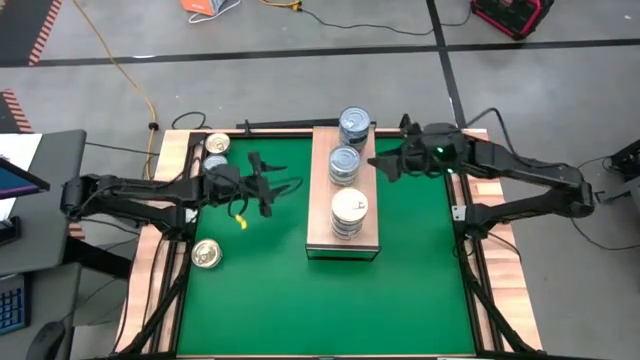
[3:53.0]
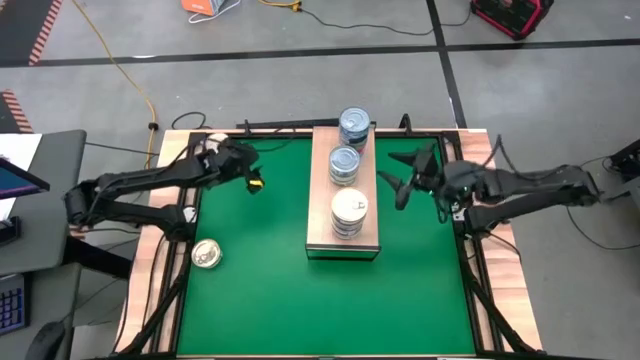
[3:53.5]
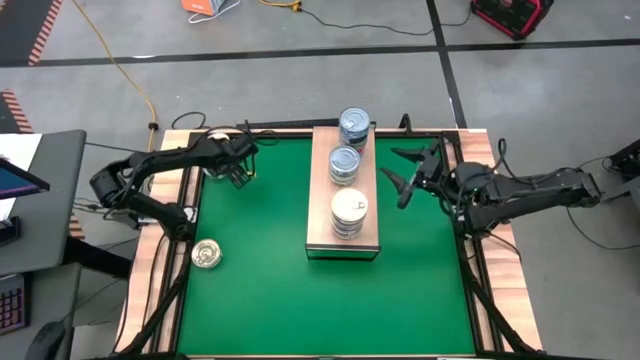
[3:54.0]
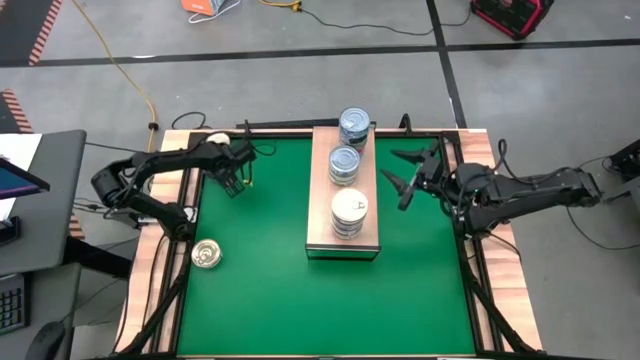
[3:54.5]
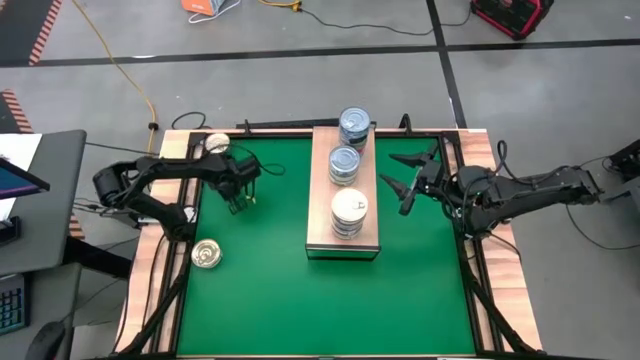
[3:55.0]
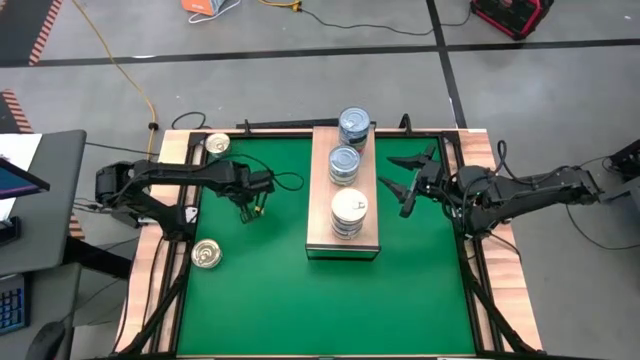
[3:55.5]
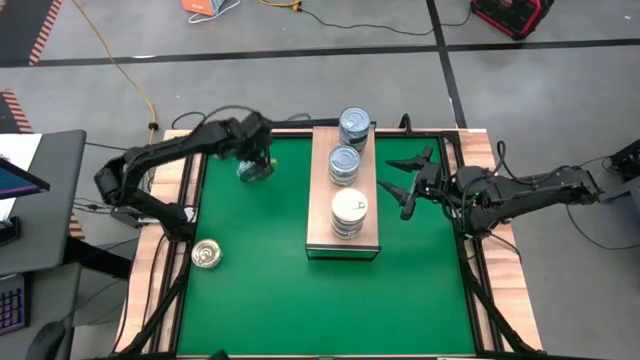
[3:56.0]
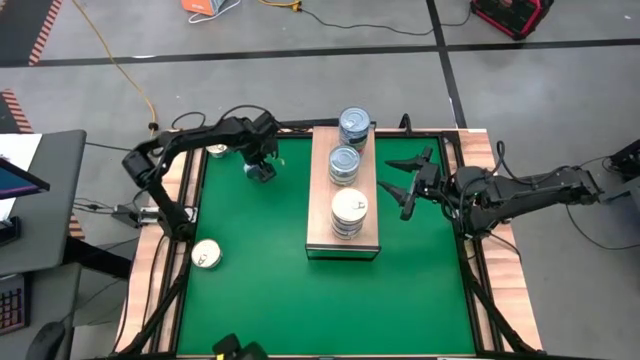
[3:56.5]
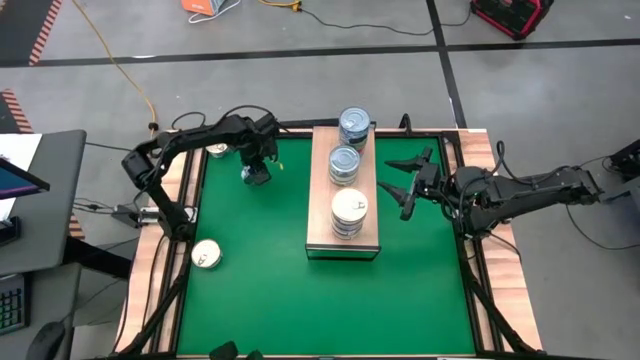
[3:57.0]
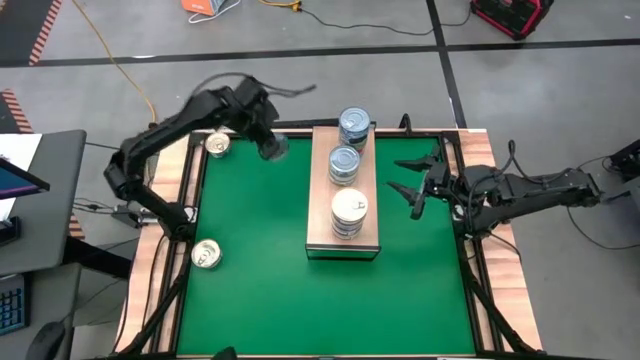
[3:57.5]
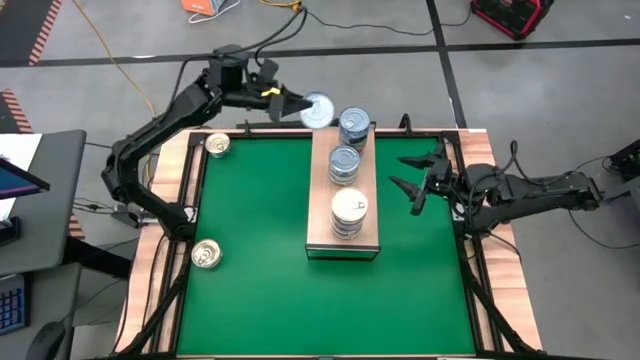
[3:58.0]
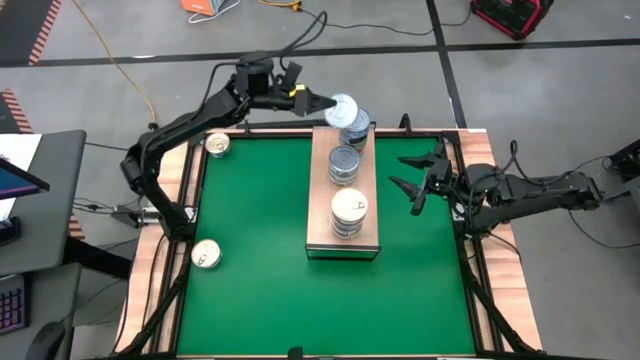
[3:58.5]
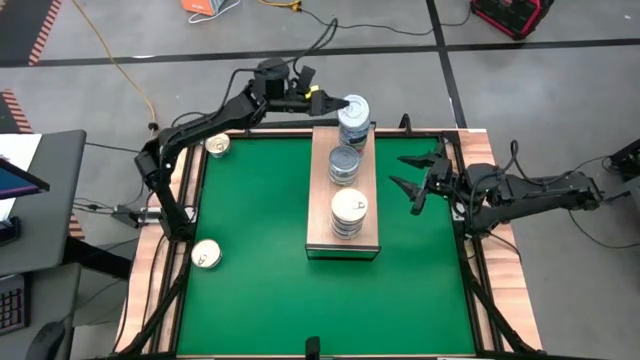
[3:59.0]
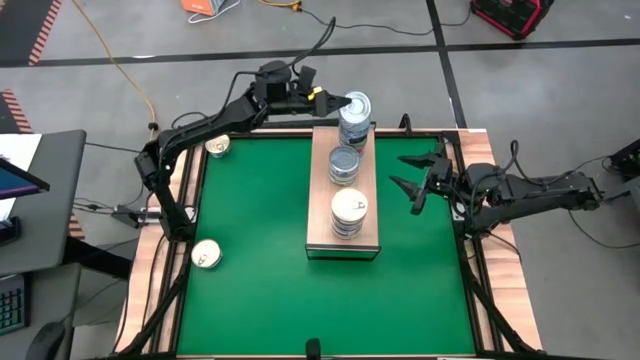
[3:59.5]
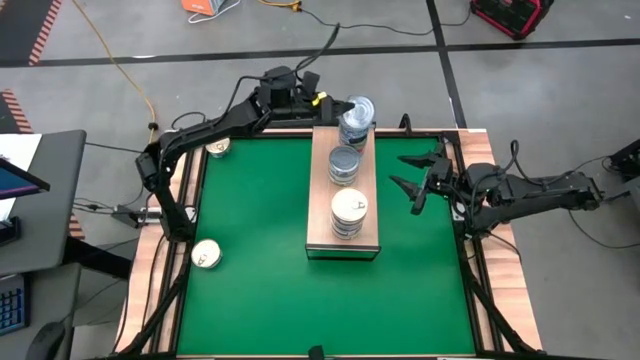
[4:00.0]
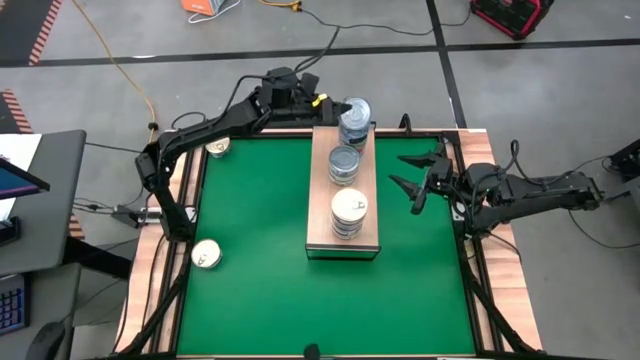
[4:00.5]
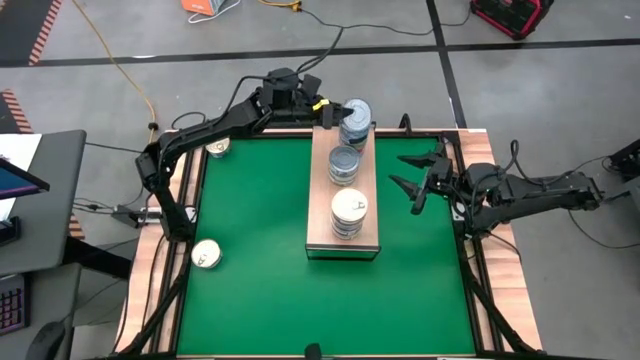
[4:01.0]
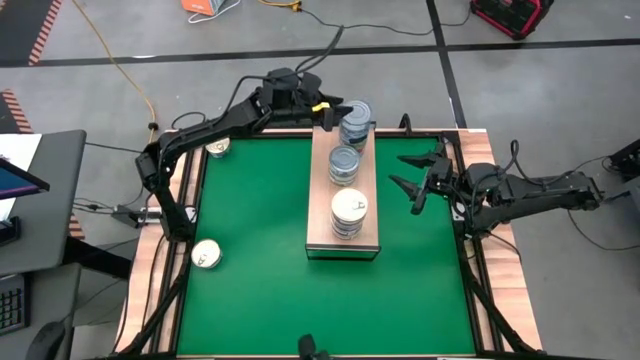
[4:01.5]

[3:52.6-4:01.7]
Task: Stack canned seafood by type on shelf
Stack the blue tuna can on top of the blue tuna can on the shelf

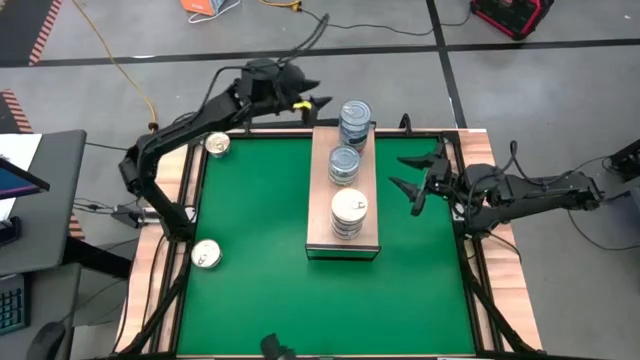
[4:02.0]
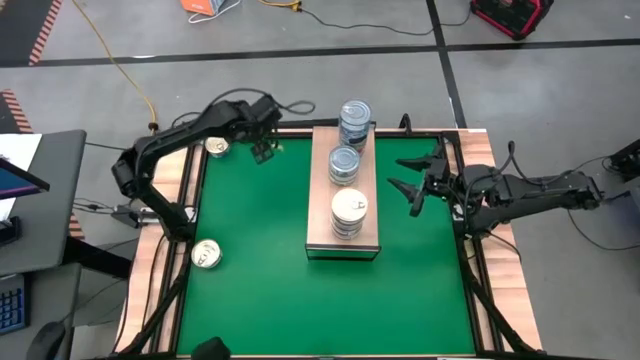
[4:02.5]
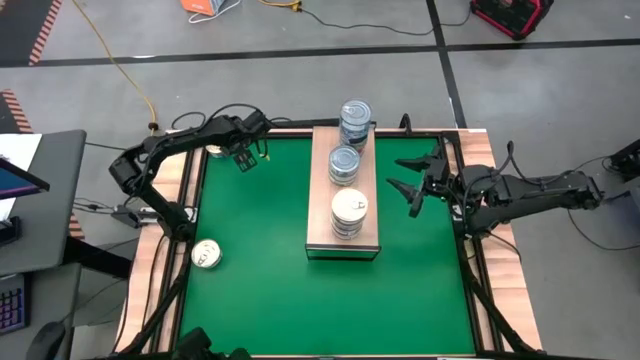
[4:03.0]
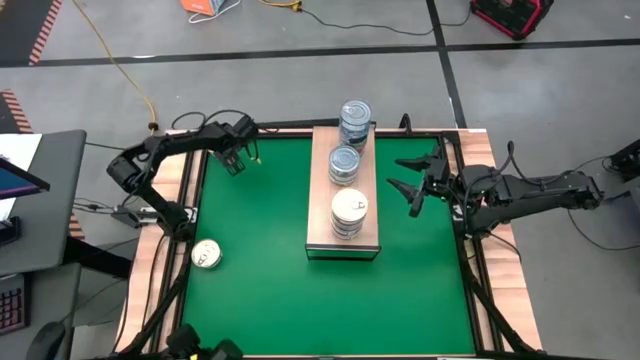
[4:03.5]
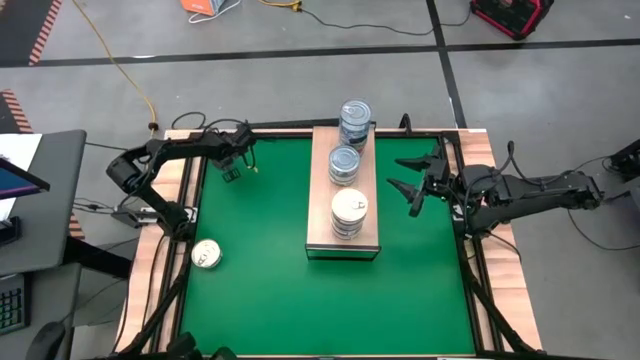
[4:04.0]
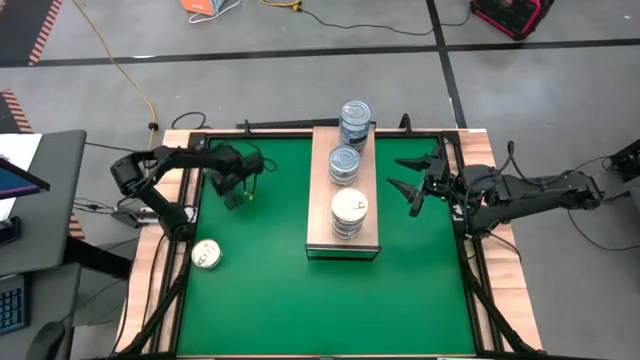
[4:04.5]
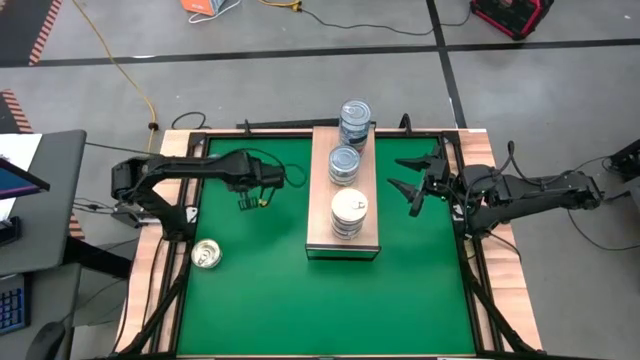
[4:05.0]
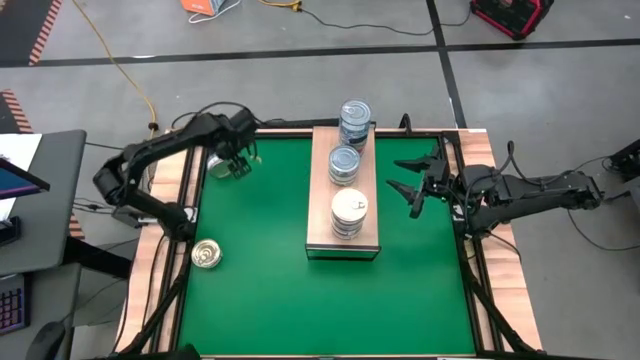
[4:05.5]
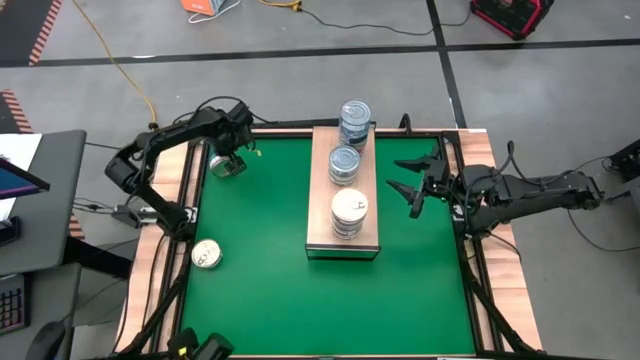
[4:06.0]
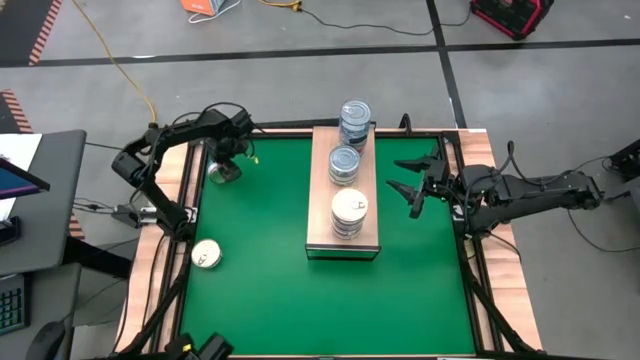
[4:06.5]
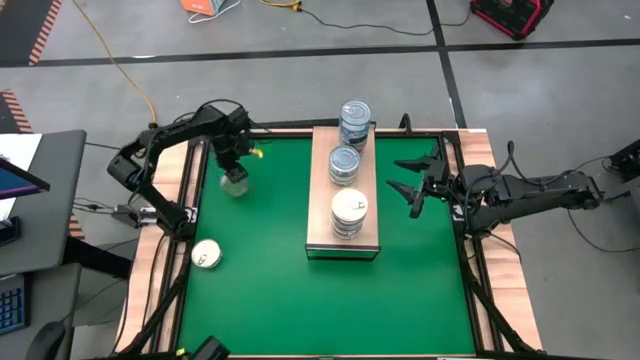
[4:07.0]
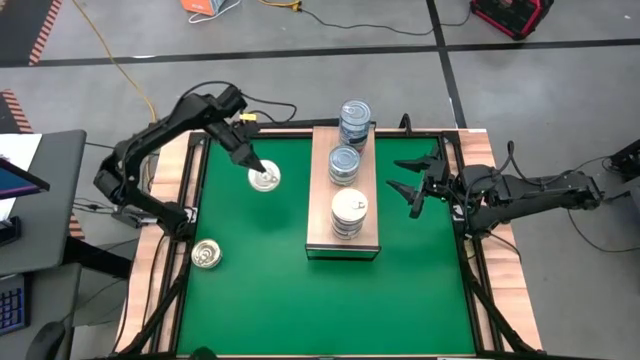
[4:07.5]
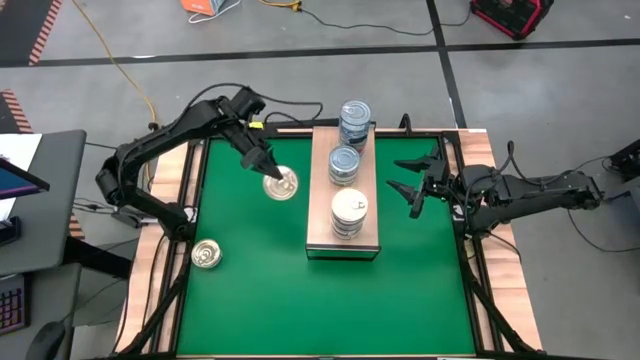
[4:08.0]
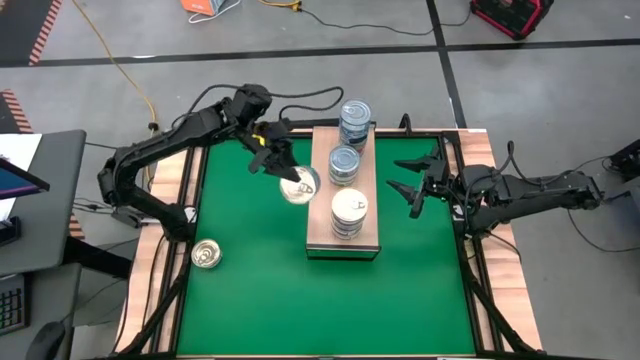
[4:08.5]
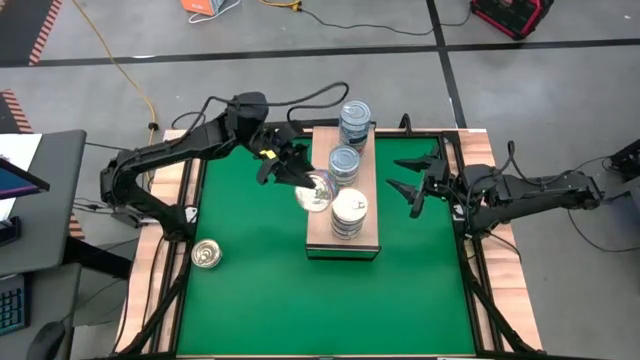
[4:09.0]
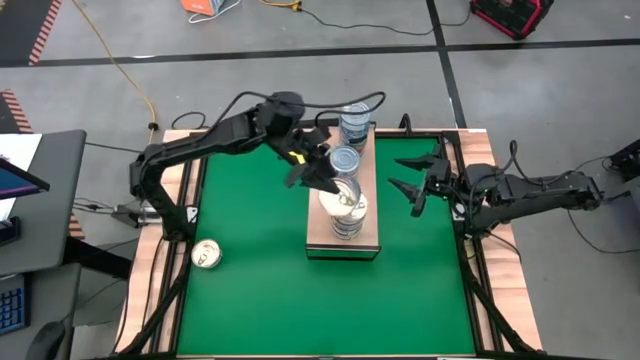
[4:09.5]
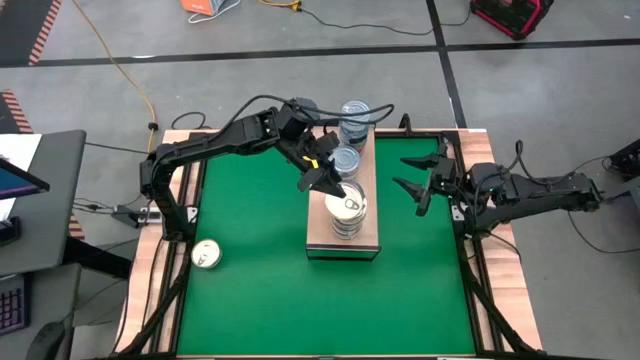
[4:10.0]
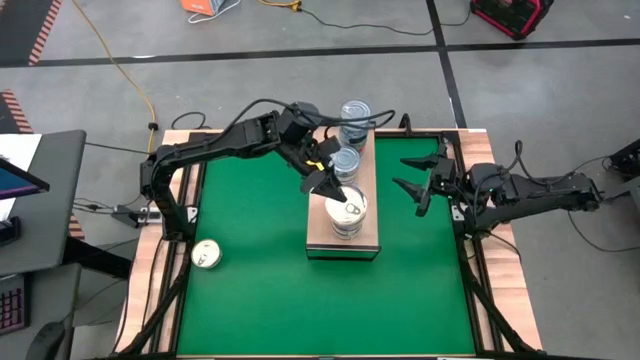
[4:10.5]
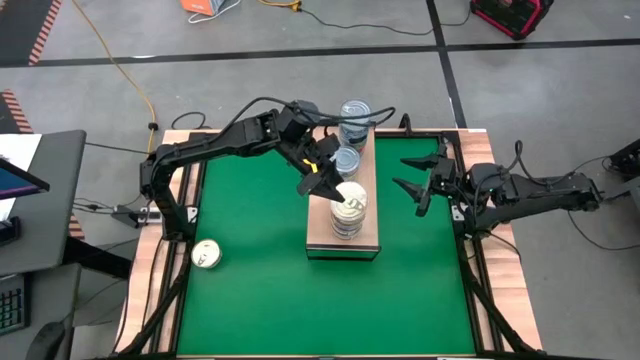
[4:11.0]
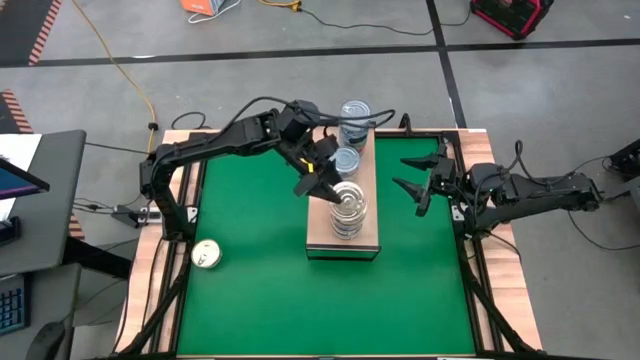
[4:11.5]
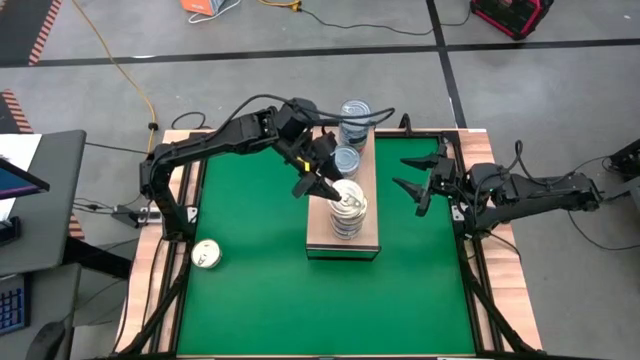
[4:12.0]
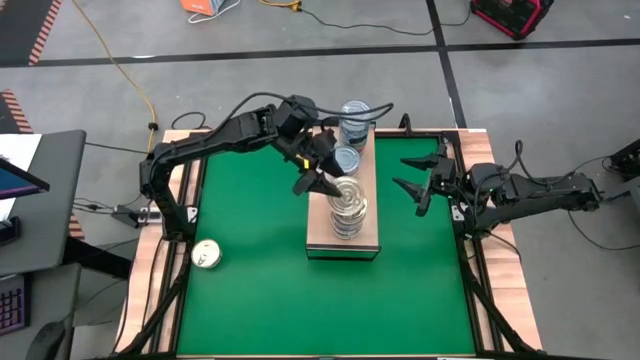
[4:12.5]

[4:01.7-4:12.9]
Stack the blue tuna can on top of the blue tuna can on the shelf
